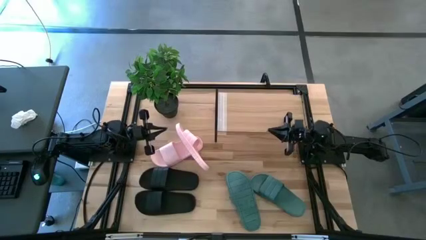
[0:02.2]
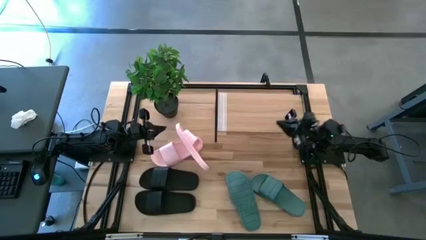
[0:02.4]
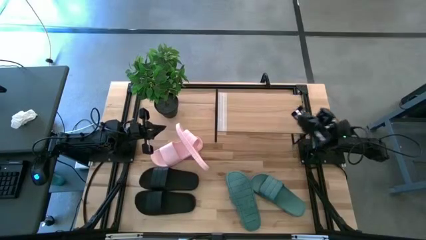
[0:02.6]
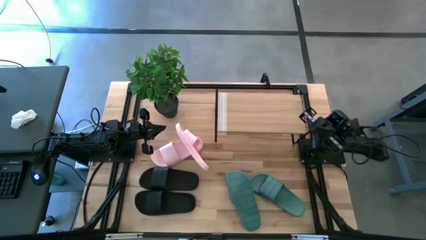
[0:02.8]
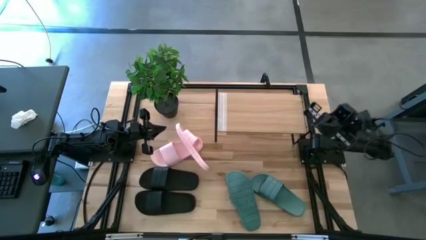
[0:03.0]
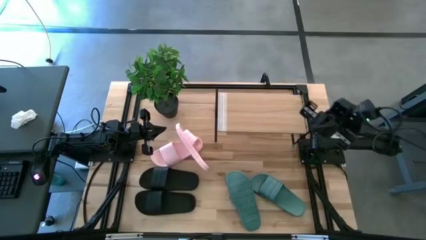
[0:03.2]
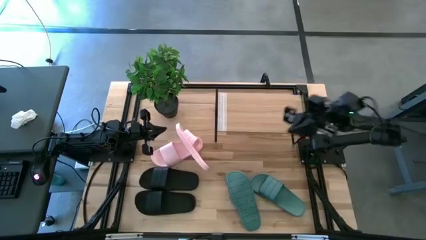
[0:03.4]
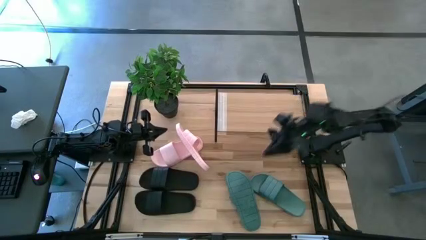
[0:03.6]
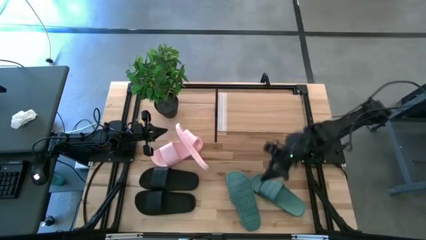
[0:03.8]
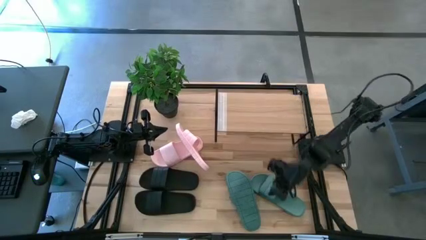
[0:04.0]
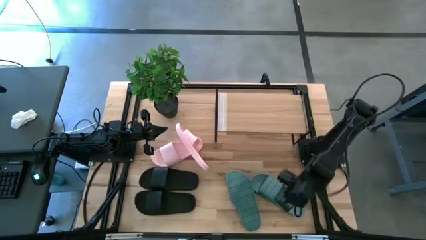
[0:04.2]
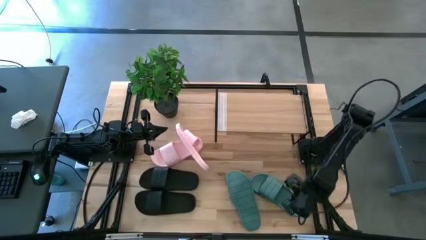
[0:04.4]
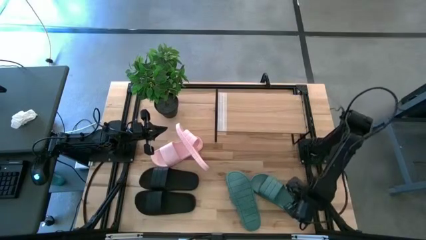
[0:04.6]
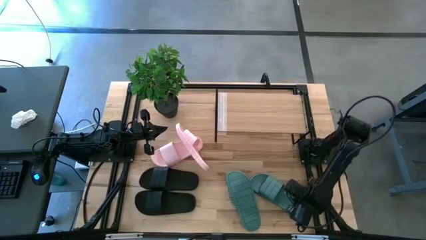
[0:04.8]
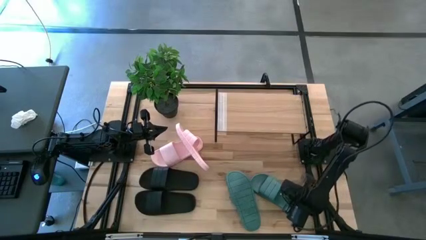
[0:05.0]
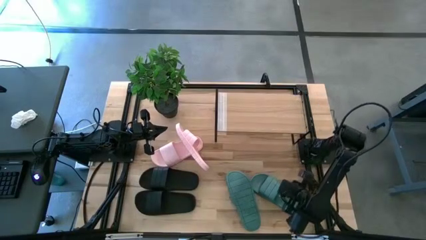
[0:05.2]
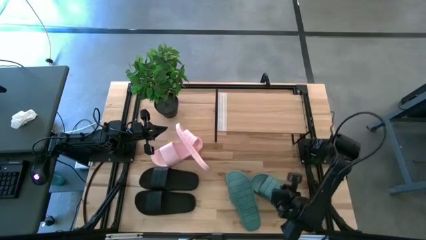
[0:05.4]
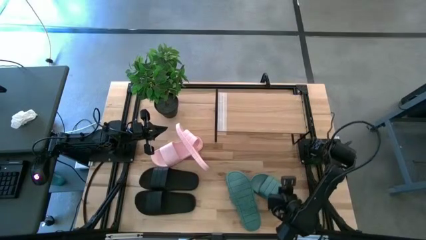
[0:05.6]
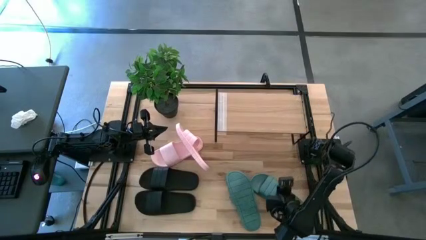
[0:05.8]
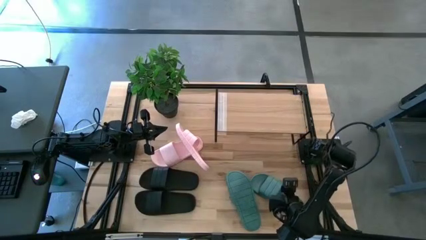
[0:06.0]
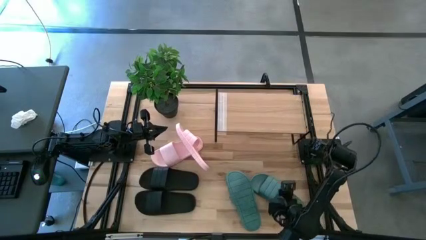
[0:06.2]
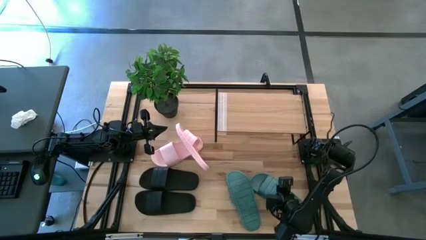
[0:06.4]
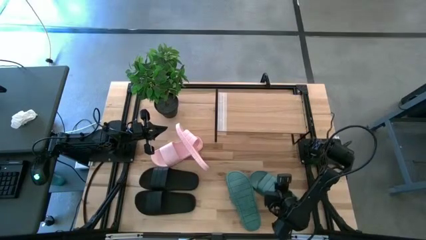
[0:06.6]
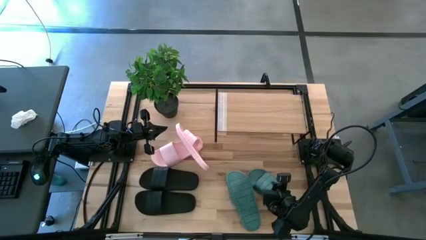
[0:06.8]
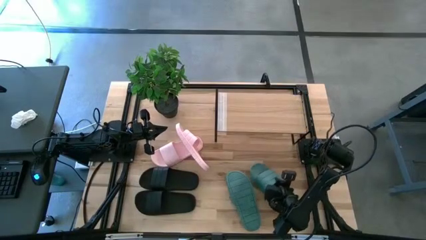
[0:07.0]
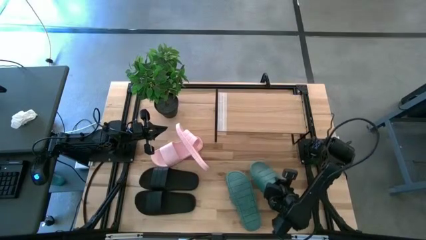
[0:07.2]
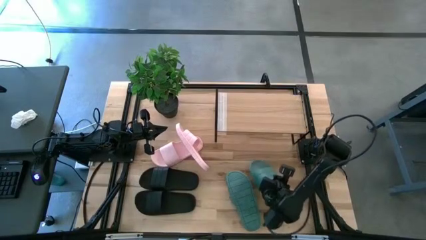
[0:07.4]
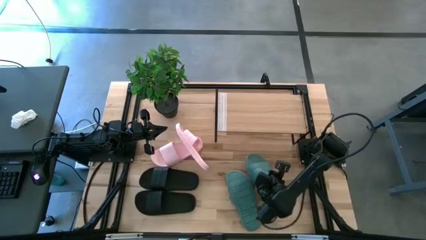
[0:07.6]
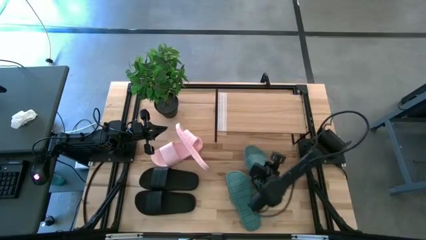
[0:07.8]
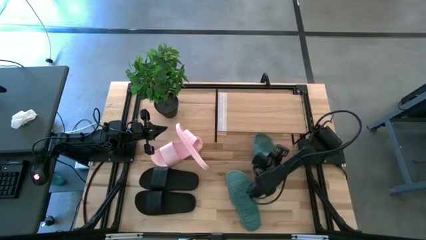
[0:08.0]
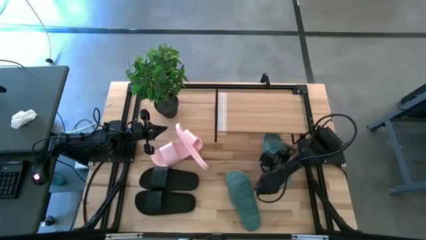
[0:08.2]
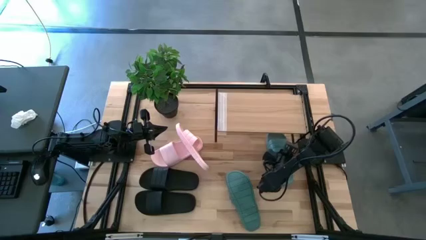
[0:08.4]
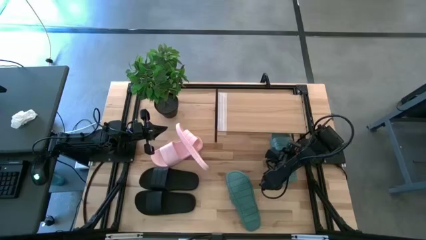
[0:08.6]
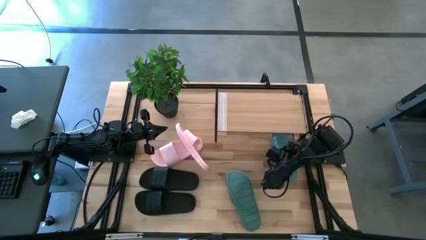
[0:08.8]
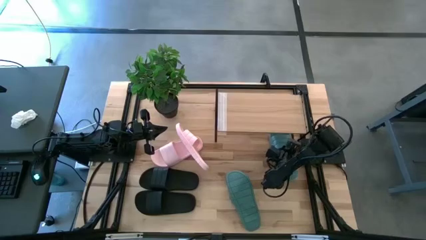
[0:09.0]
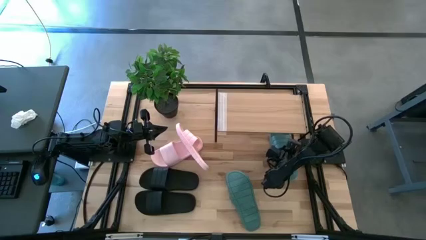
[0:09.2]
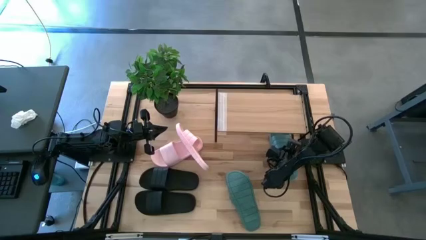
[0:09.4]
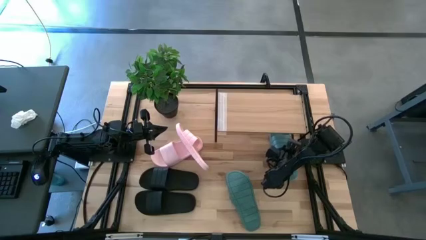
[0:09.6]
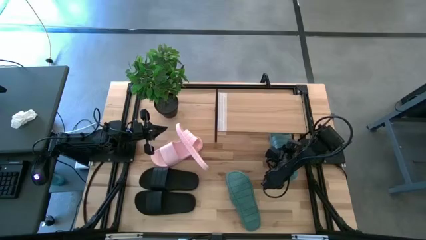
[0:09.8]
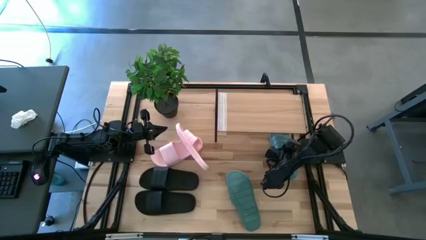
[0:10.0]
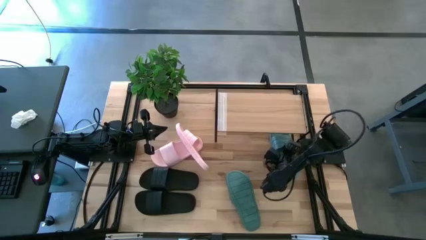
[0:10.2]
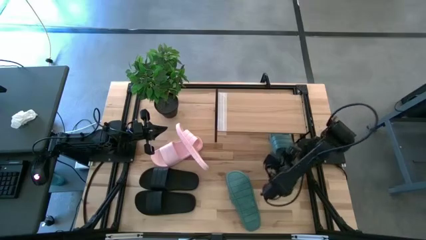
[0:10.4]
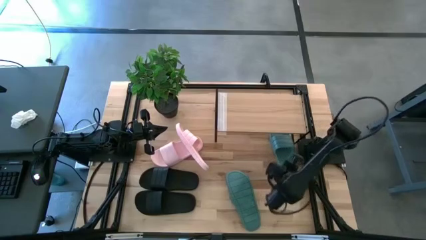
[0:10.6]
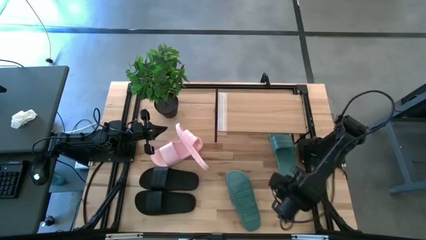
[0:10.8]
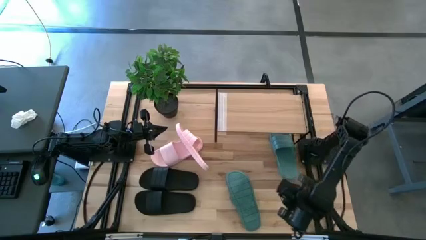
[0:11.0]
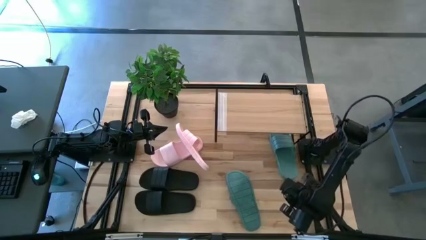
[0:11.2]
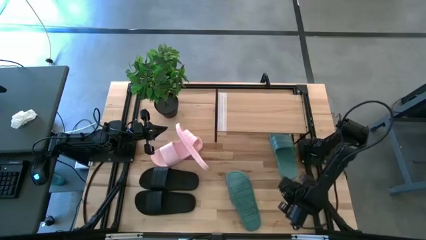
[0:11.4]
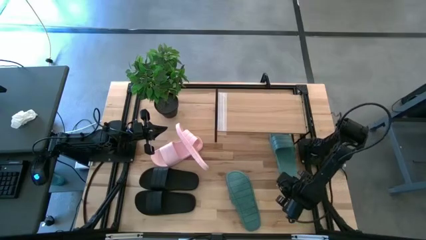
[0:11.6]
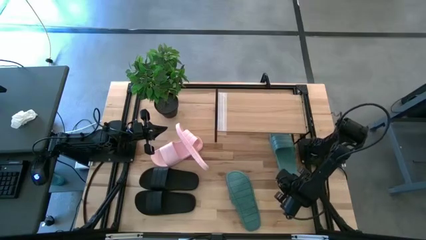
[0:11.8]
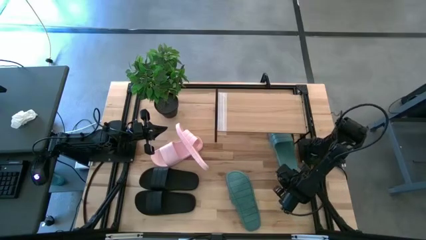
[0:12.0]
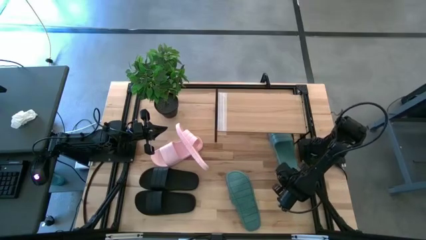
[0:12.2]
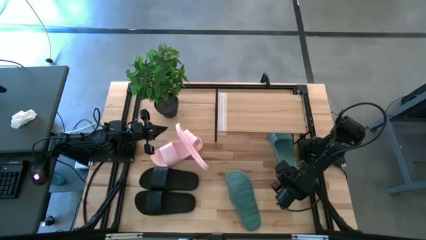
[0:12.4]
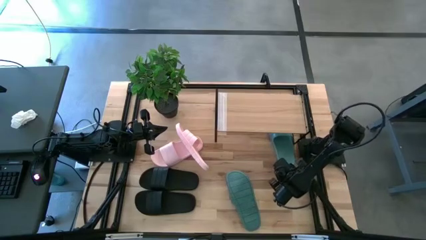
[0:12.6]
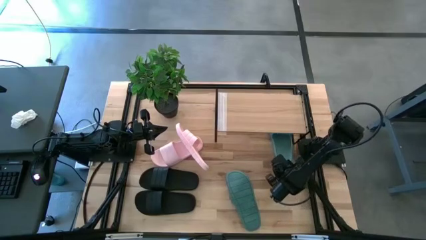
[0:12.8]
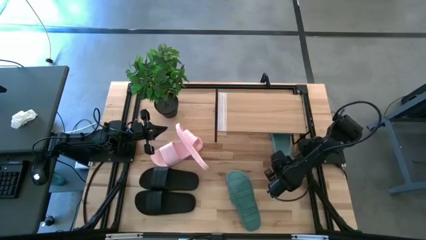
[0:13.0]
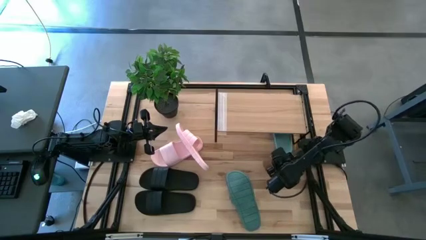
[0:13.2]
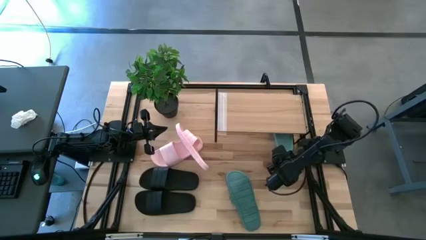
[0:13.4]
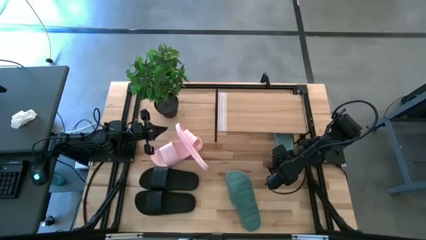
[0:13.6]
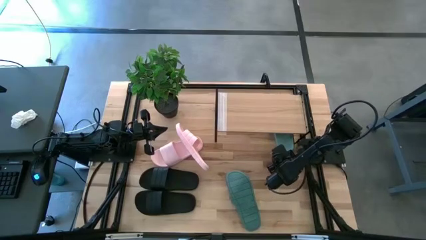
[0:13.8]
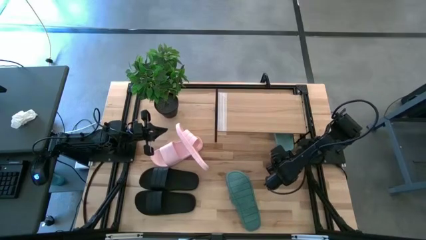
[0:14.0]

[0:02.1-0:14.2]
Task: Pick and place slides into the shelf
Put the right green slide under the shelf
